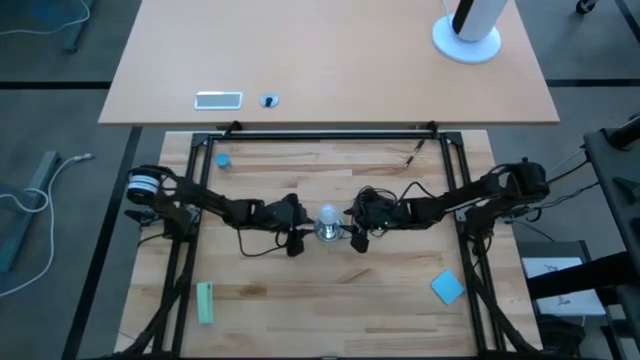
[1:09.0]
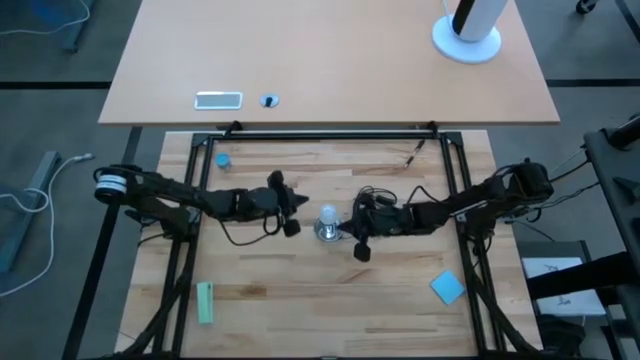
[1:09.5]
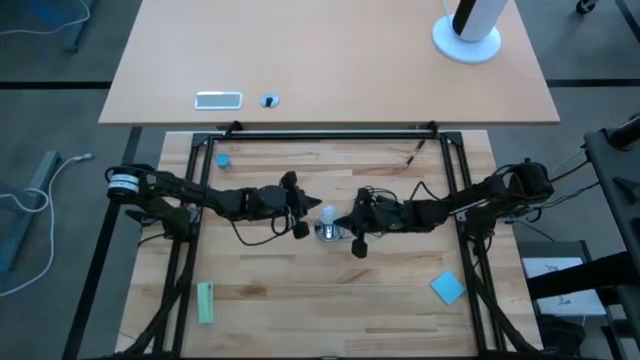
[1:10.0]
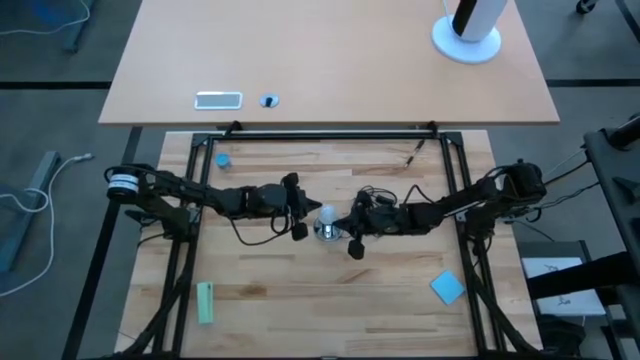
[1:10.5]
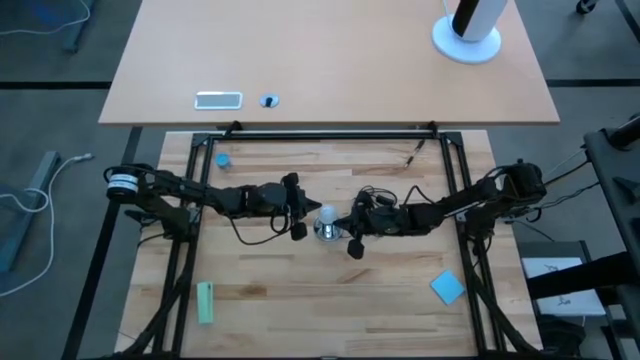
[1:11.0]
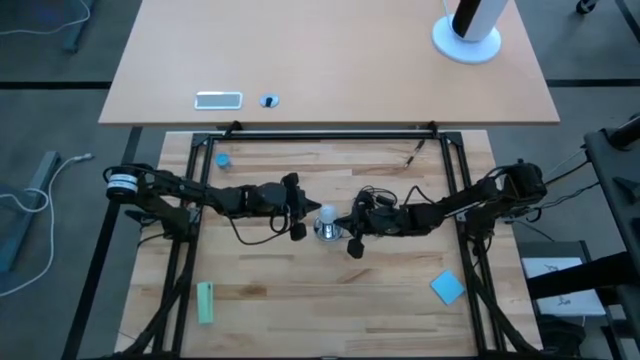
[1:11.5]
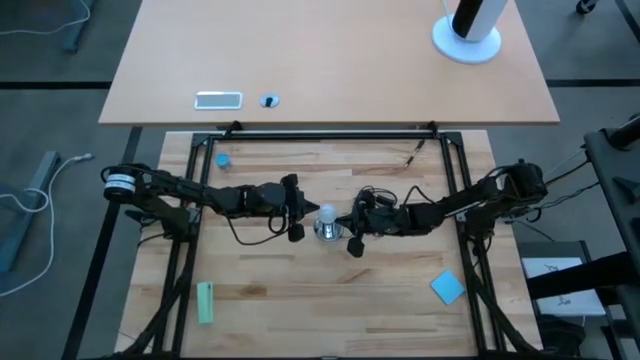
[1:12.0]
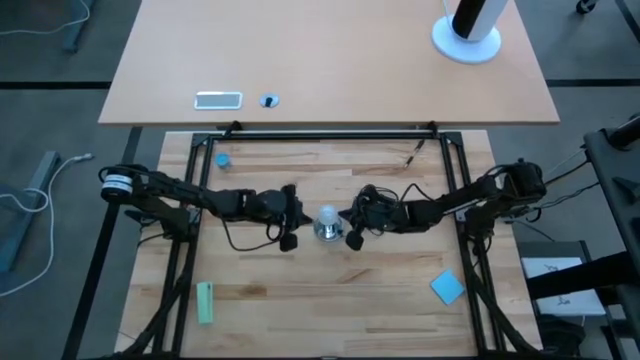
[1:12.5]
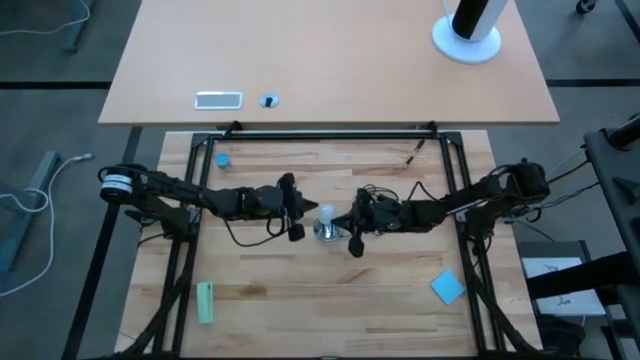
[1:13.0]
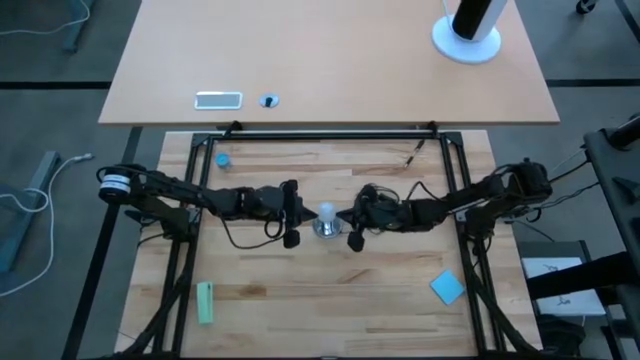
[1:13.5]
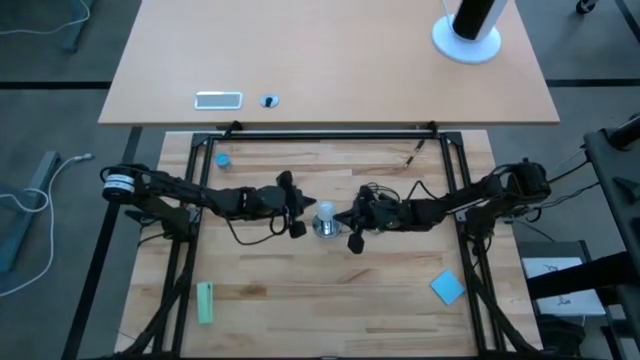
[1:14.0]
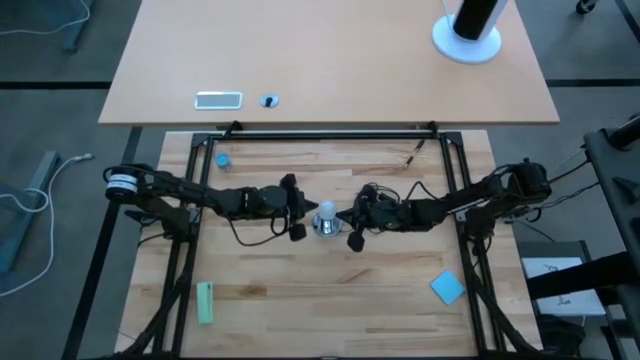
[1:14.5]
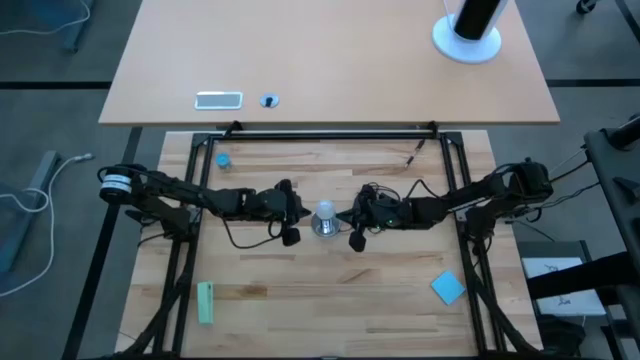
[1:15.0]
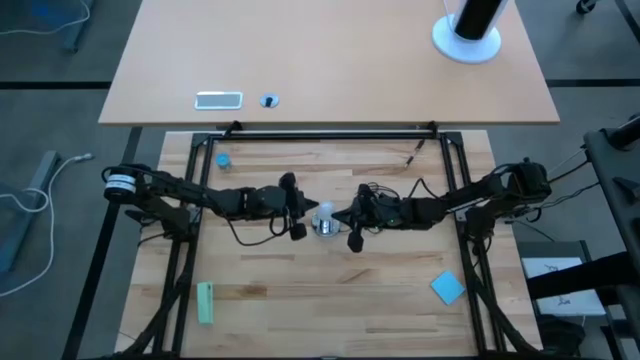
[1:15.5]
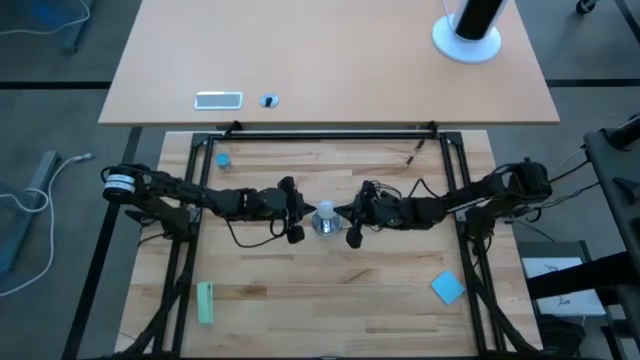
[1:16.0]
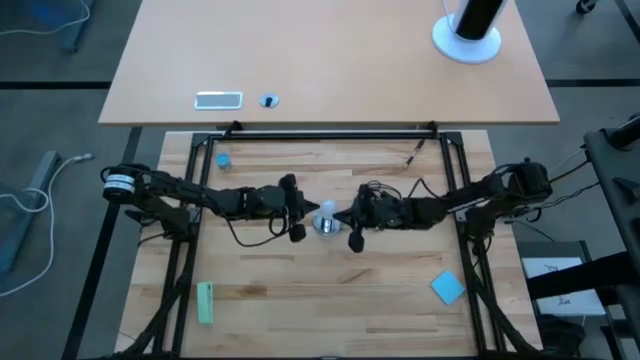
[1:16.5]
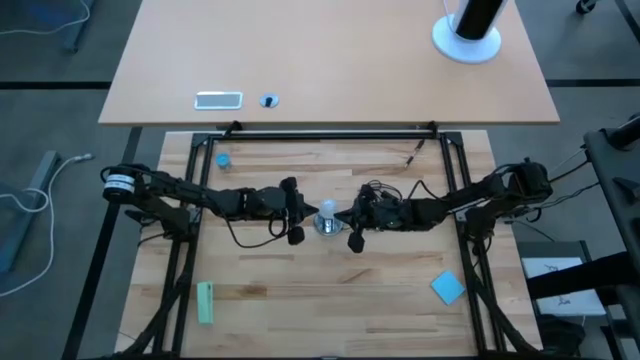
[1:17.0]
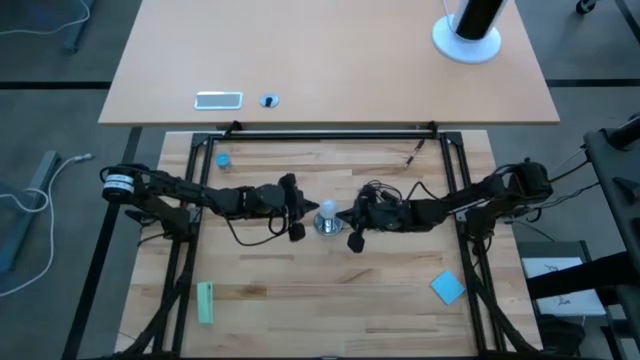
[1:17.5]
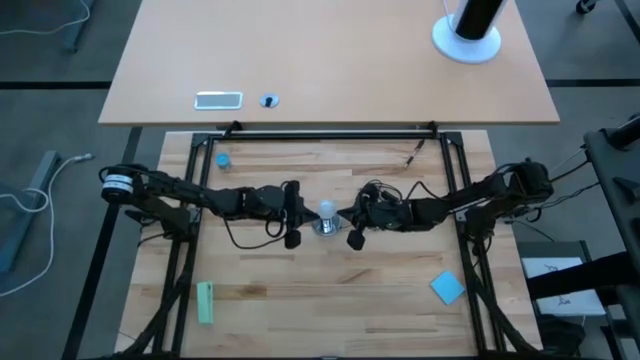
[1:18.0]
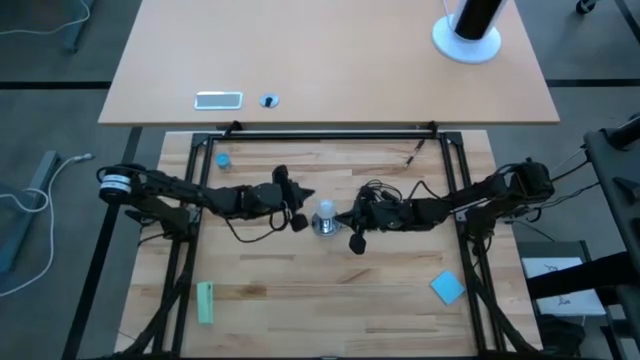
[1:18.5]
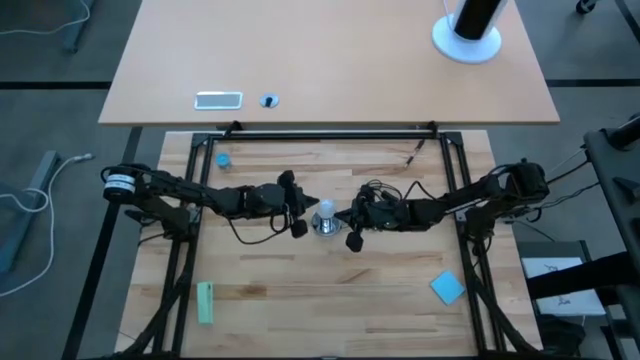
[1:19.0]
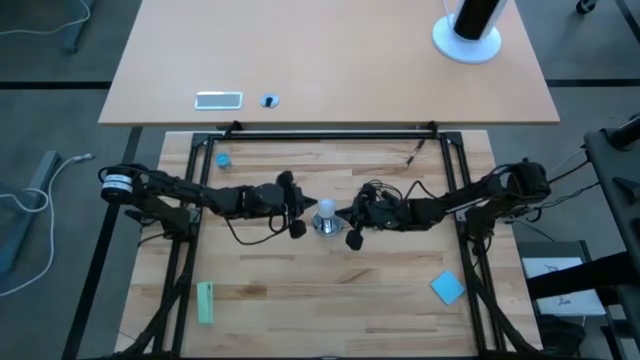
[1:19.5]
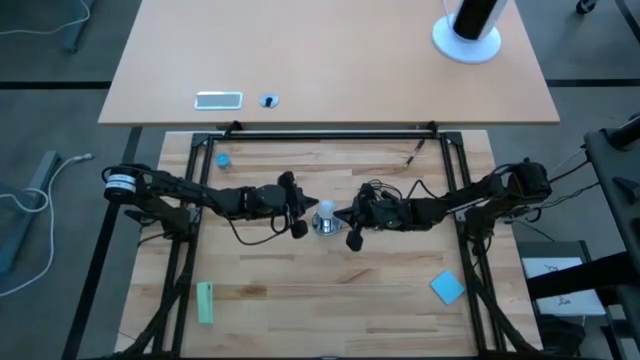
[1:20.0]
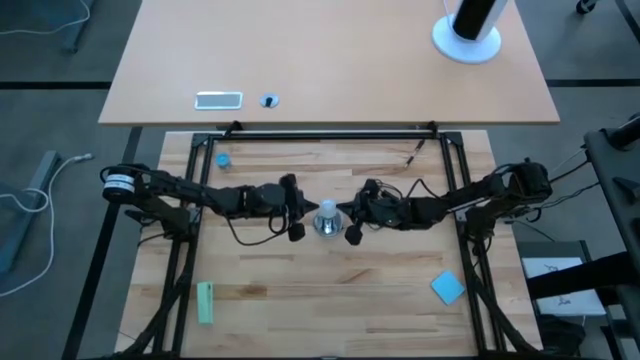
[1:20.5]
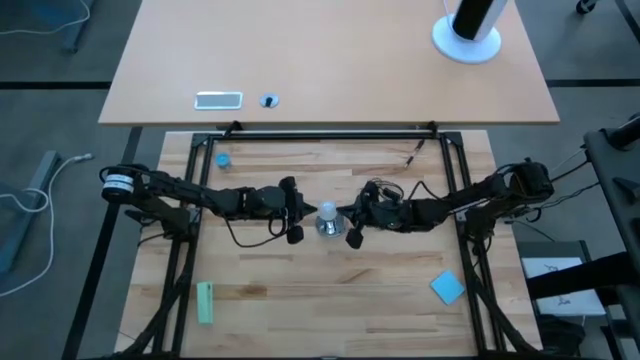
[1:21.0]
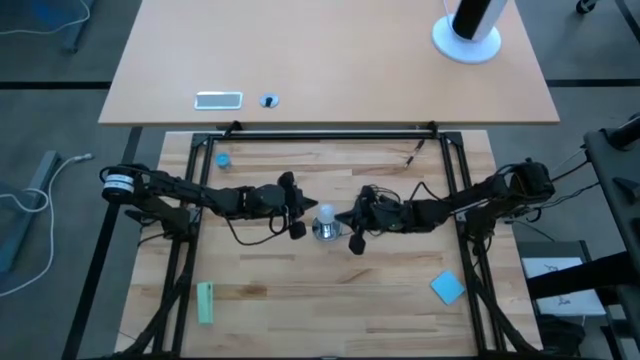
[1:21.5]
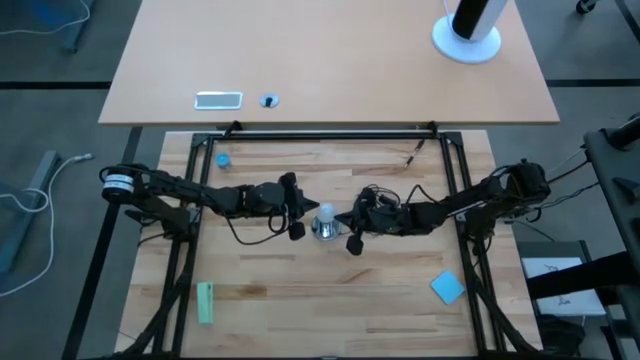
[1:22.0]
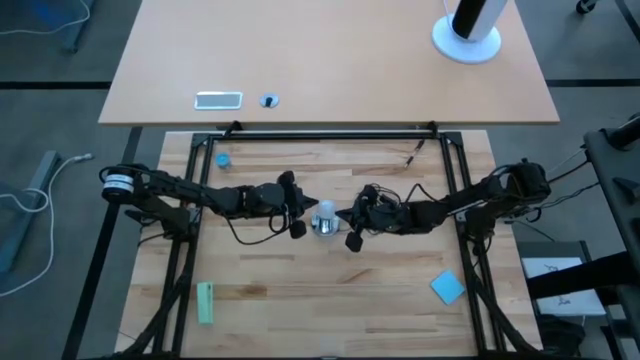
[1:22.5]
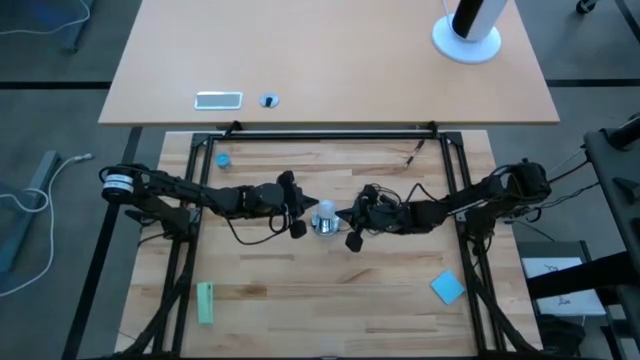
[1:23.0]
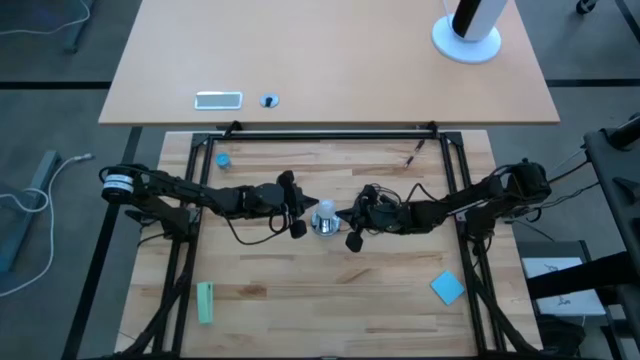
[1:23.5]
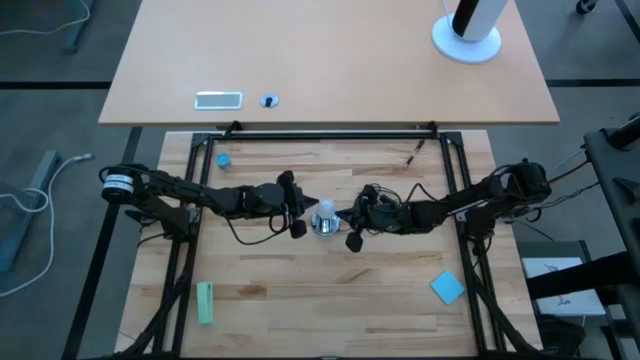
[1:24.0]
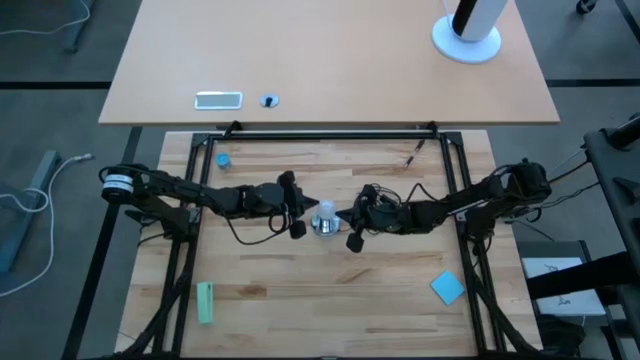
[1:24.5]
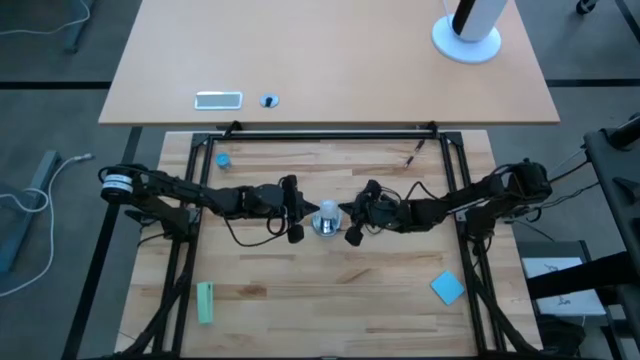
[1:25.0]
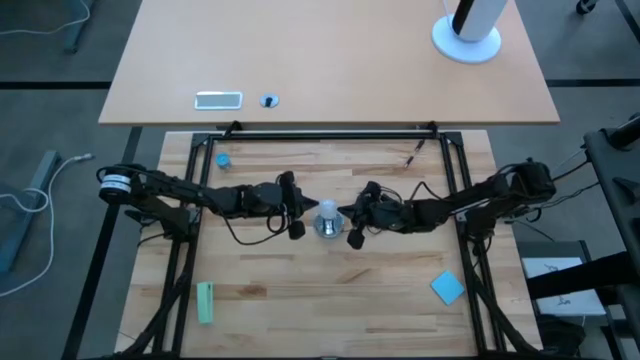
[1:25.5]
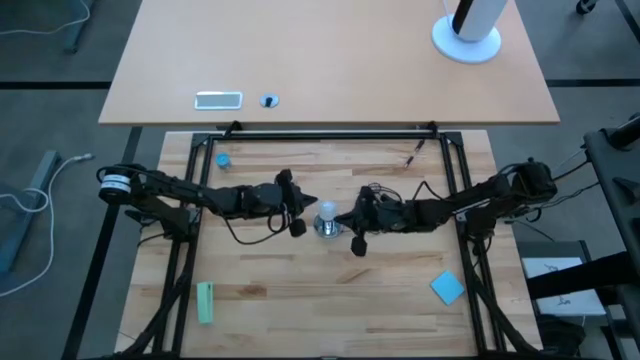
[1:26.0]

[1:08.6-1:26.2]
Task: Screw lightbulb
Remove the white lightbulb from the metal lamp
